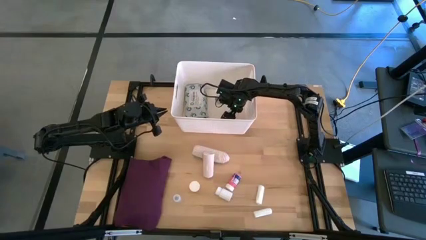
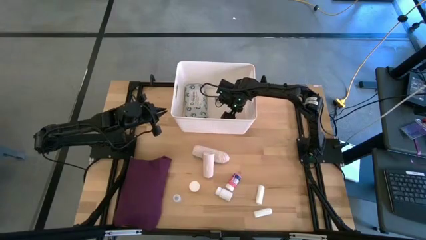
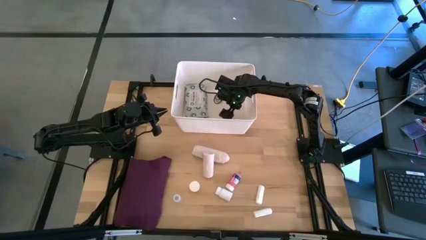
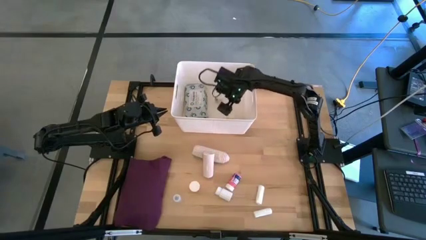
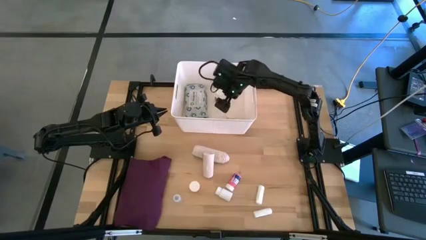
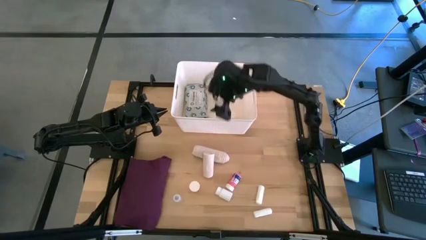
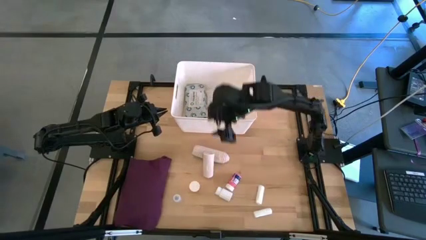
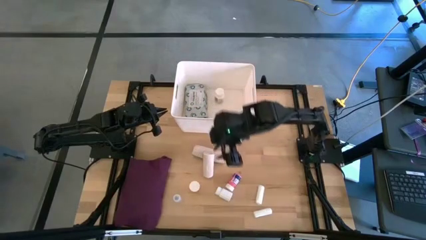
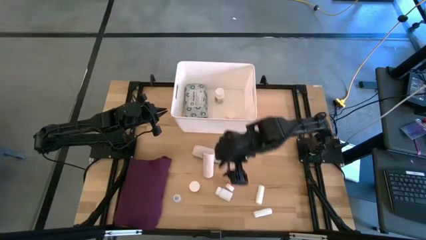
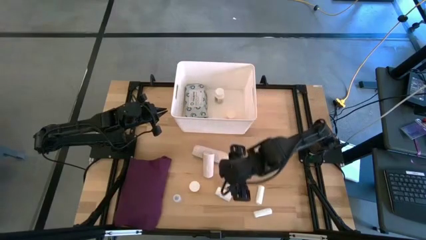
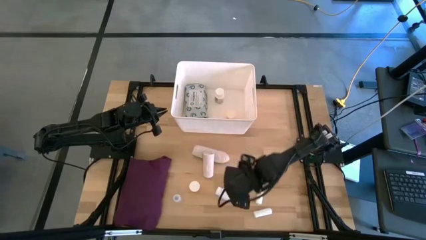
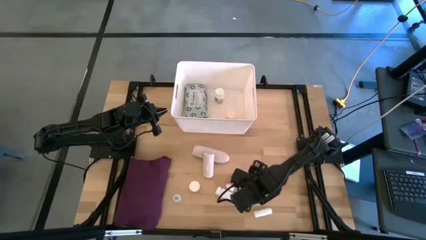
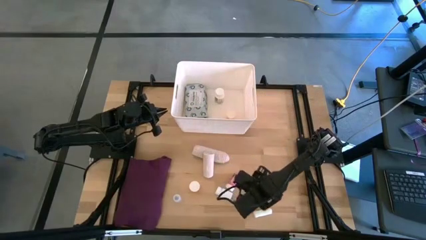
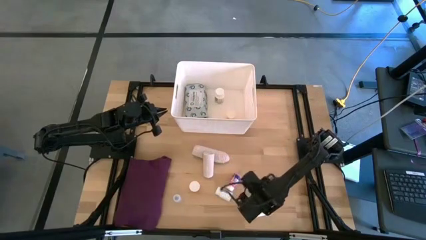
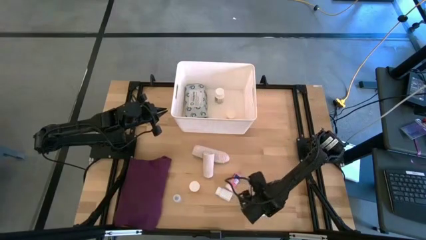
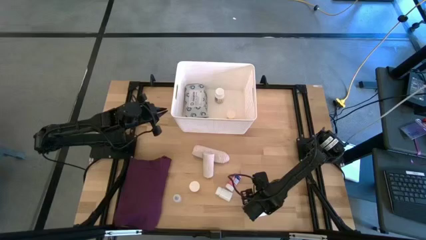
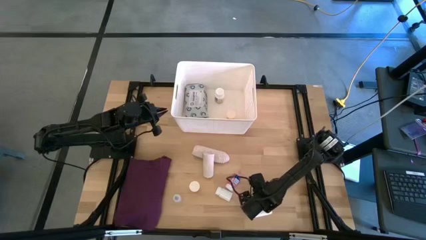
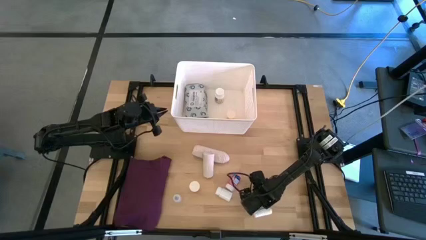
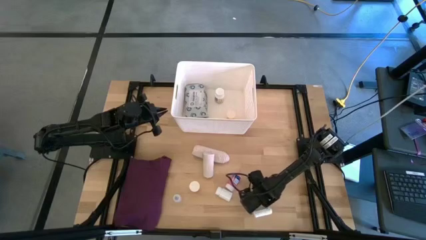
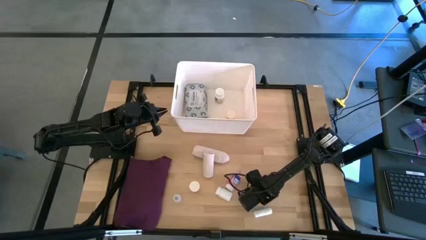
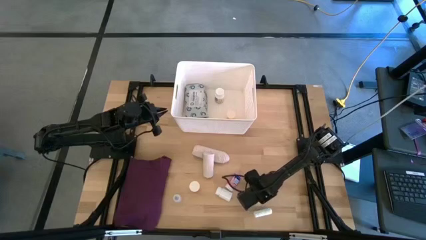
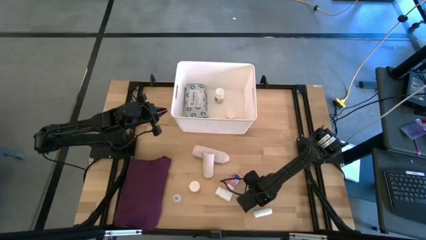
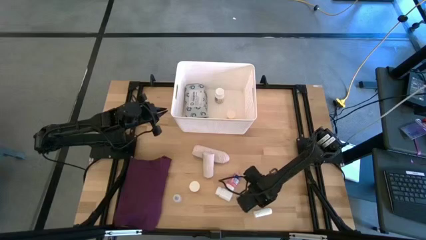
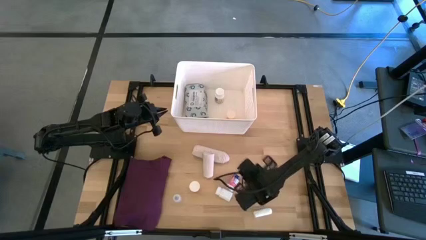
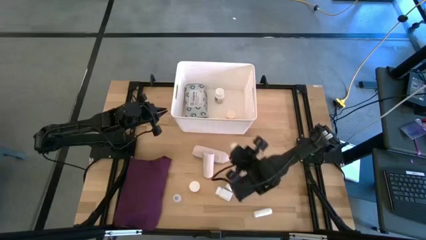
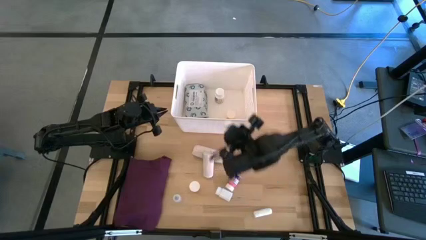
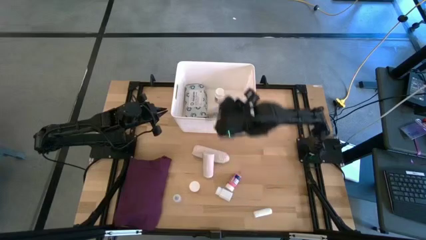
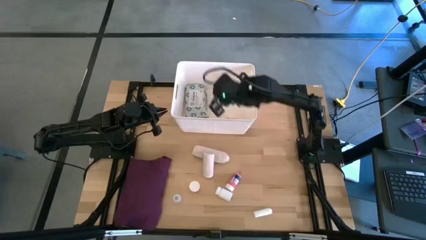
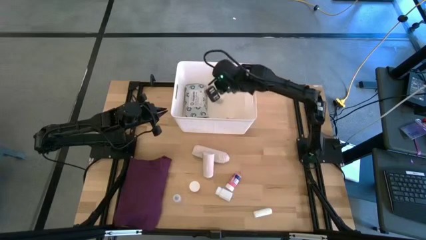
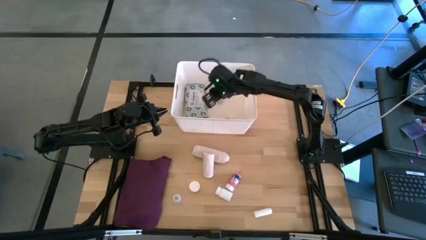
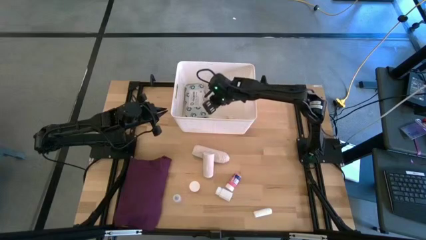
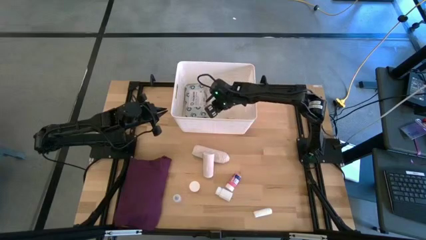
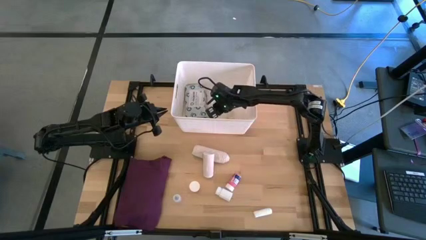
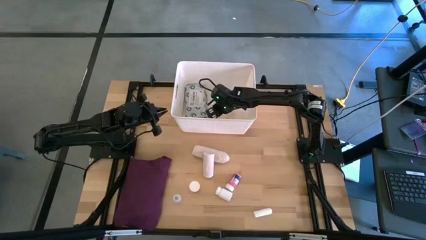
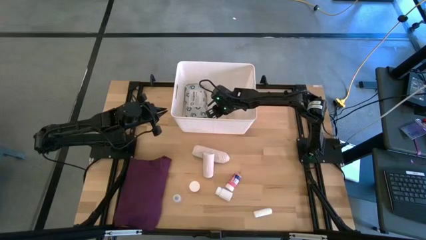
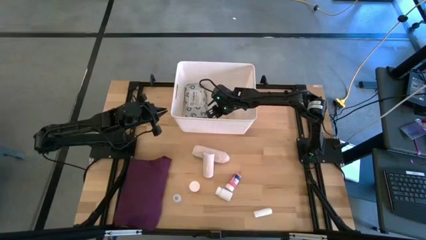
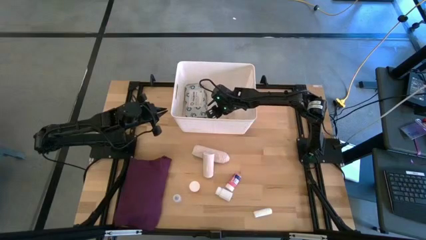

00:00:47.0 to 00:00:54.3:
Task: Pick & place medical supplies in basket/bin
Put the top white rolled gauze into the white bin

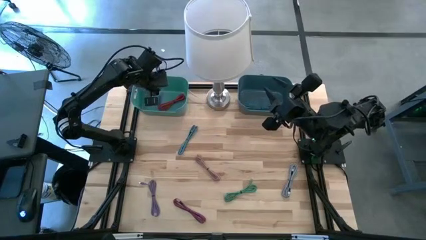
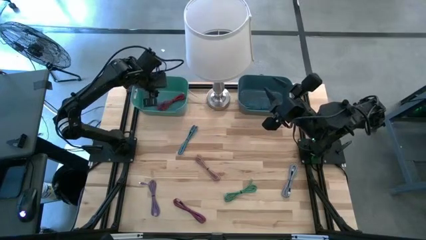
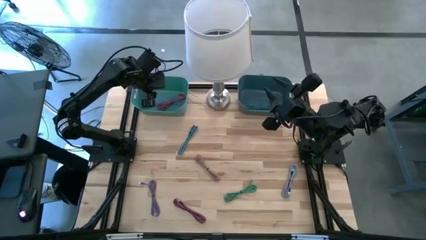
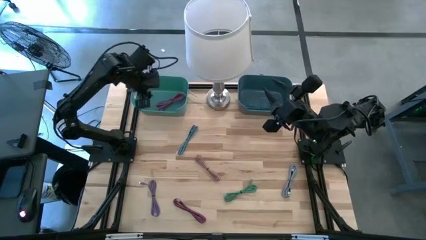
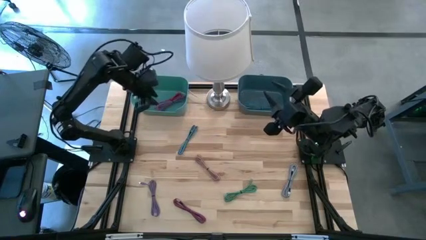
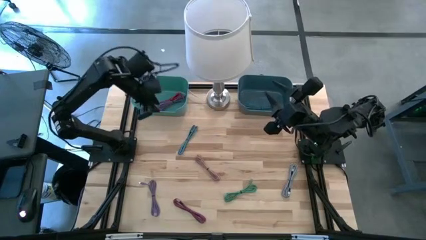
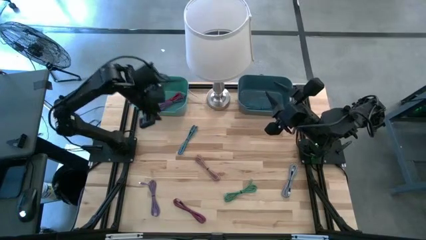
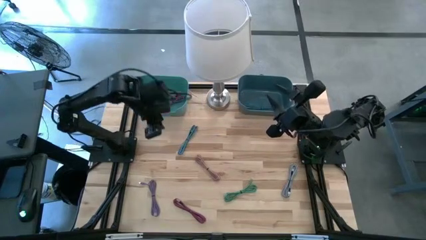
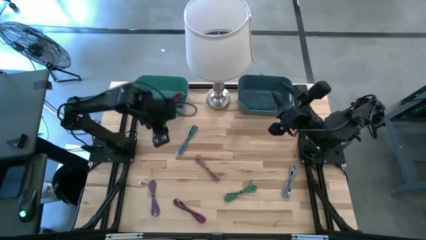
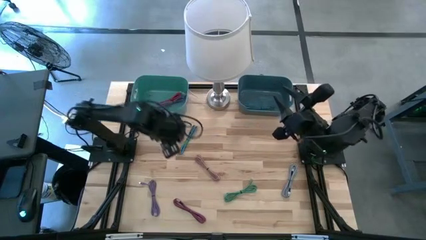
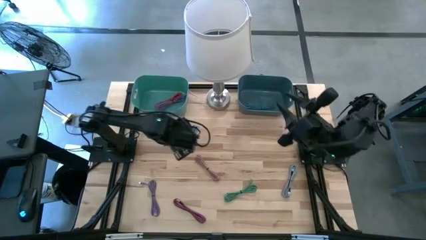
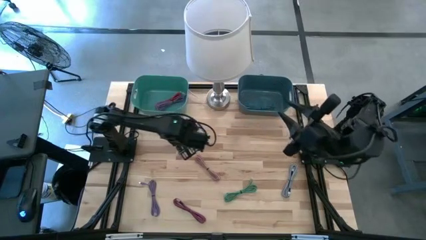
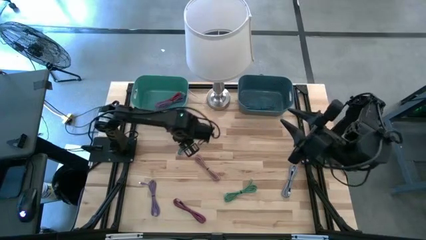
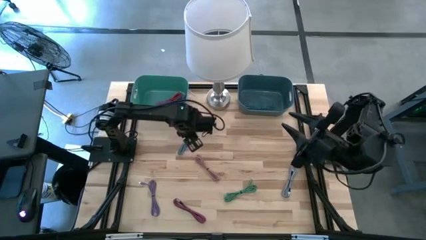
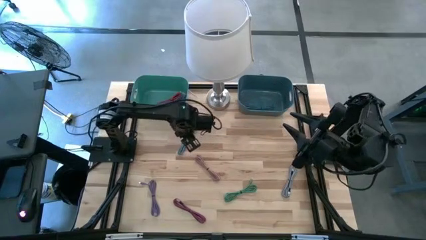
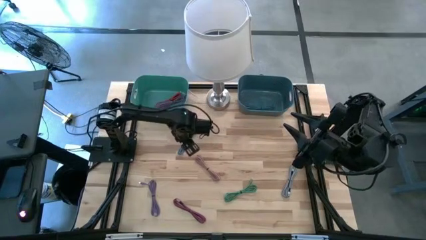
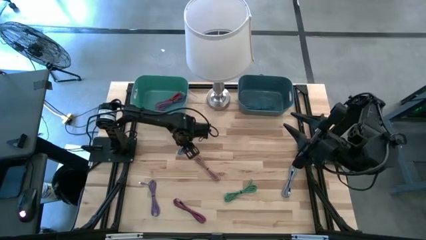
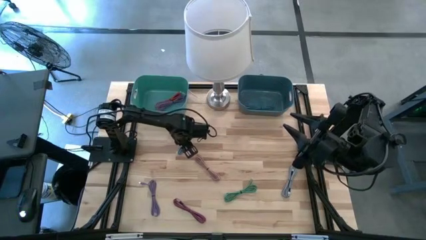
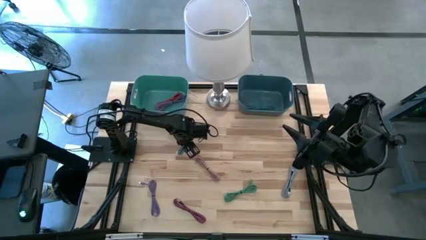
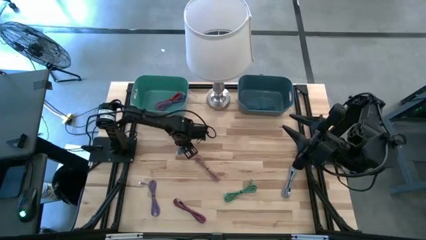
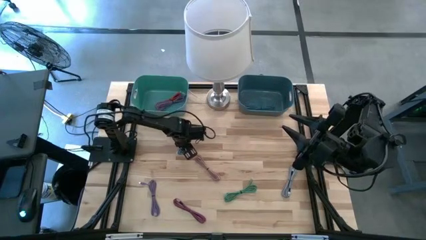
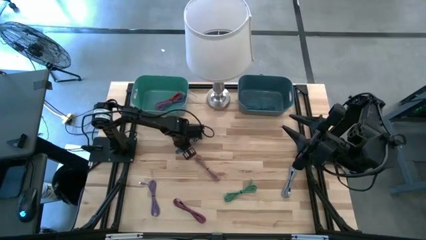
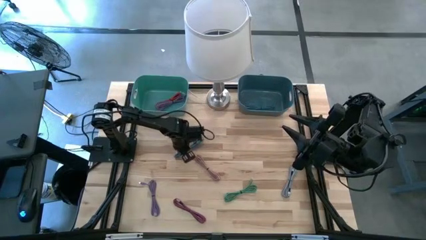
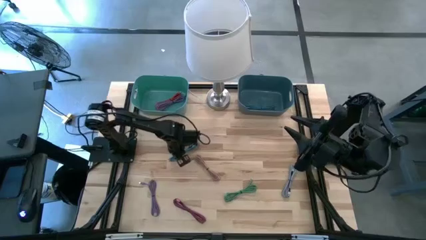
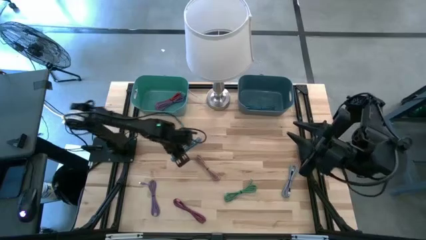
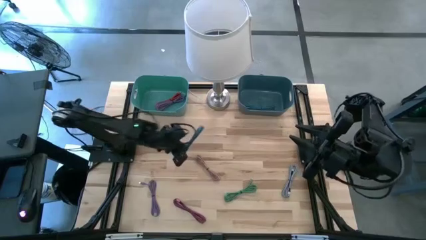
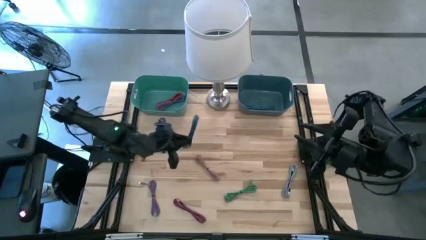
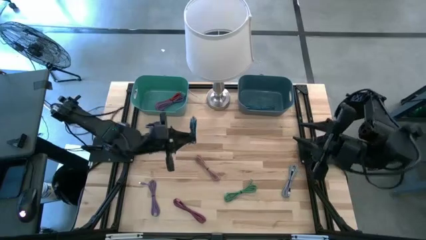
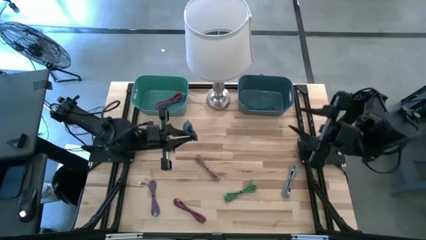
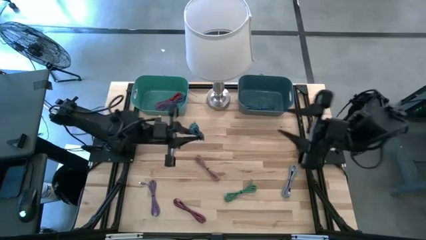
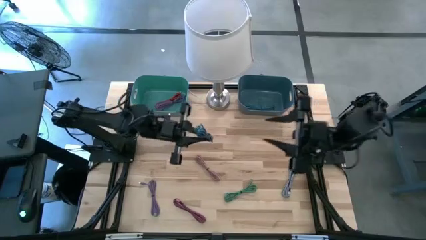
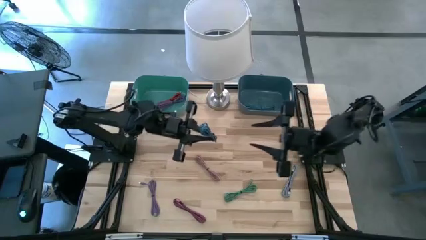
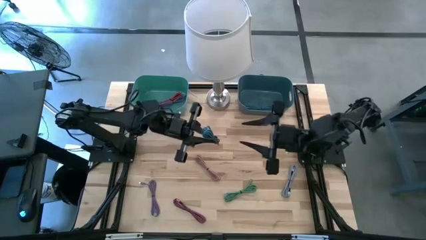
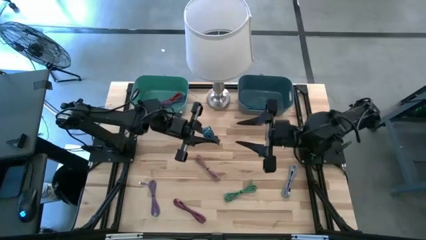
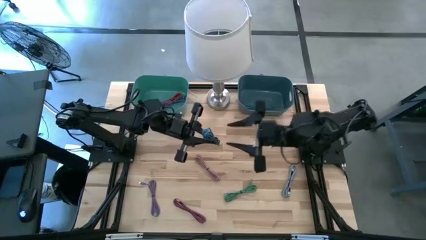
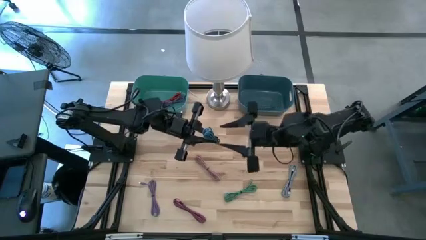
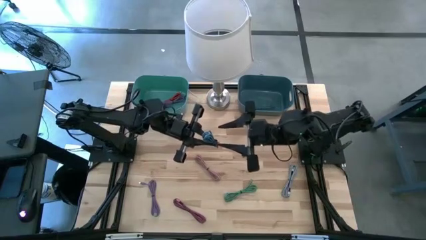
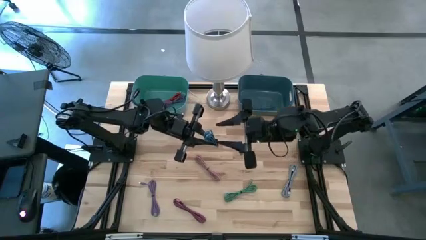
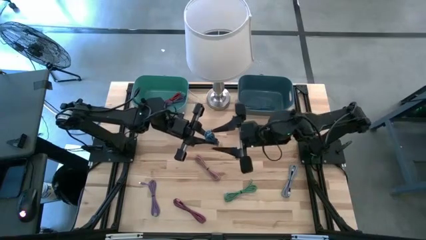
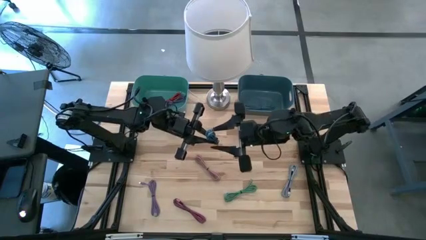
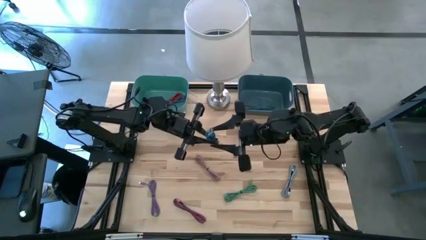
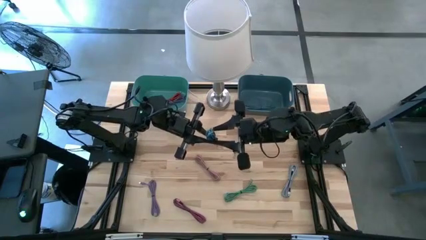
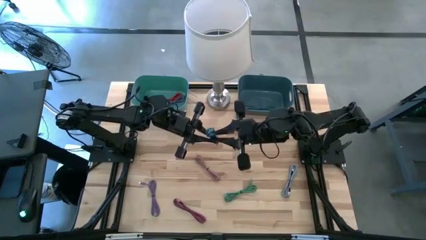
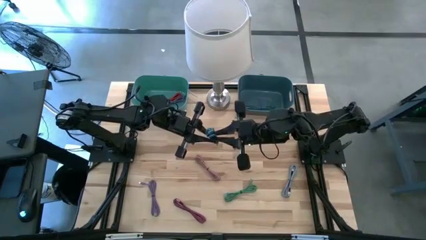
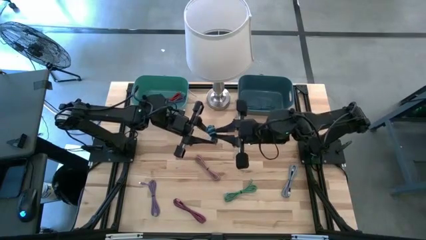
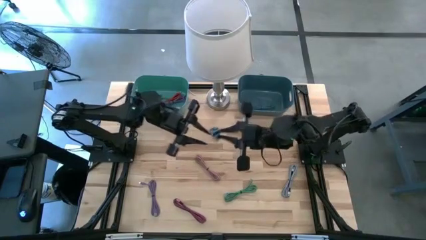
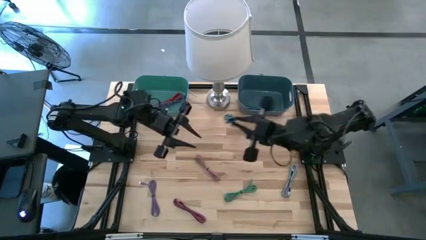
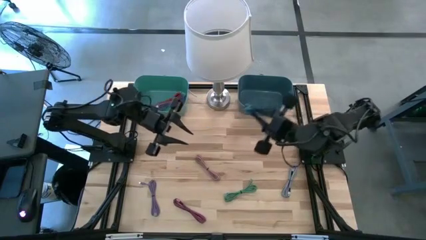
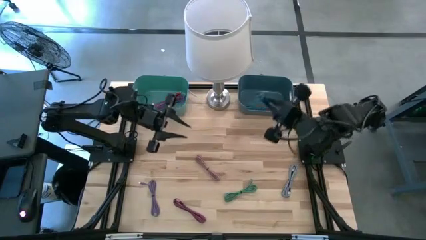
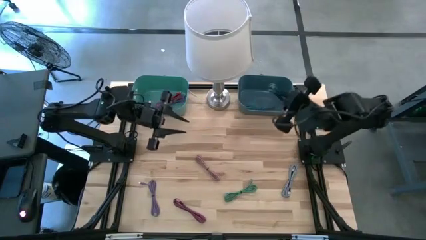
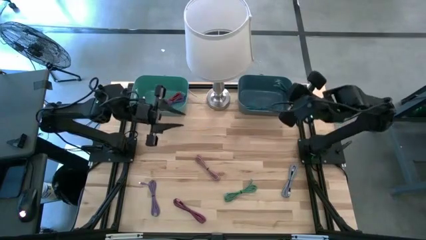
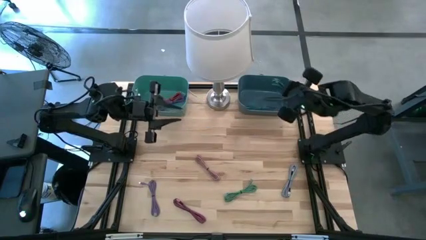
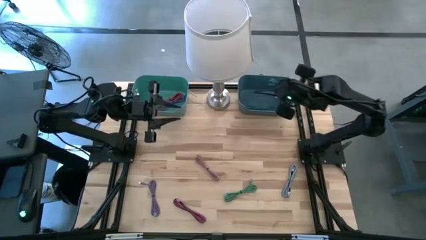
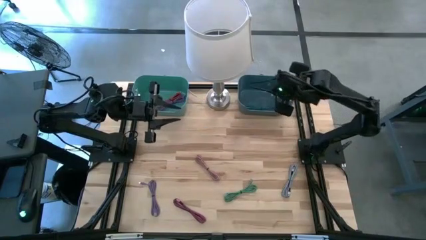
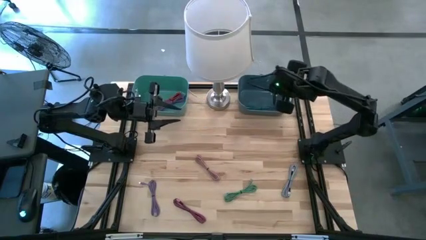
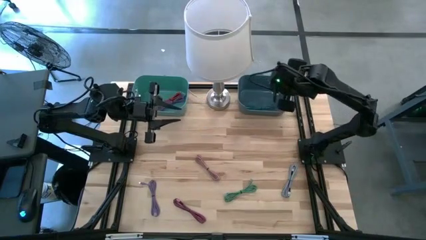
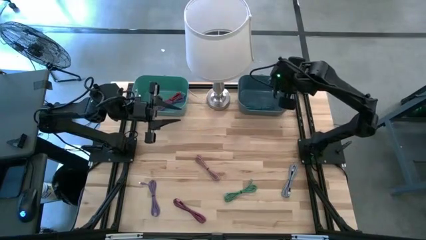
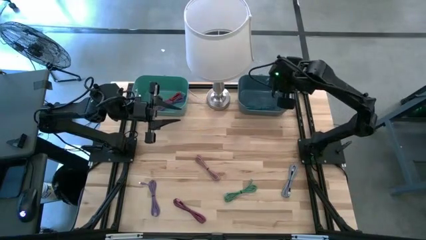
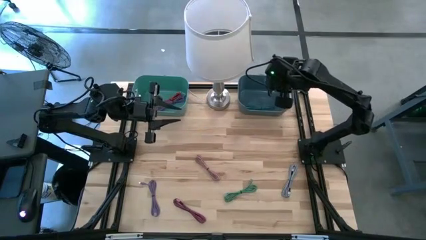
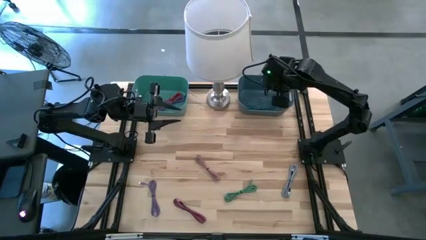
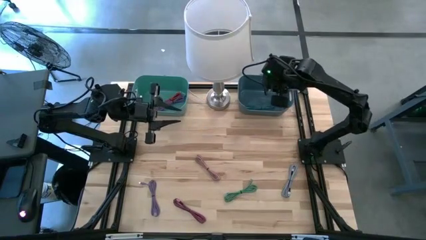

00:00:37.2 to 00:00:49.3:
Task: Pick & Place USB Port
Put the blue and black charger cable into the blue bin
